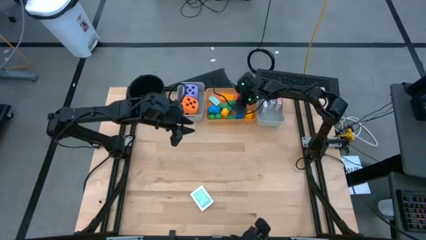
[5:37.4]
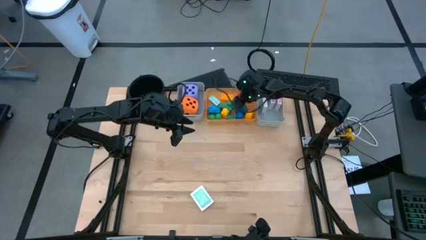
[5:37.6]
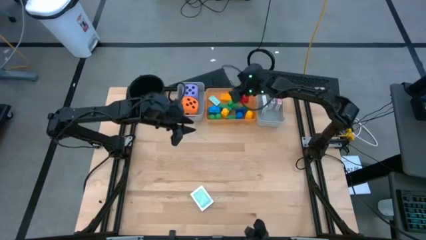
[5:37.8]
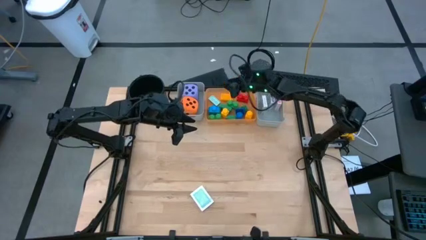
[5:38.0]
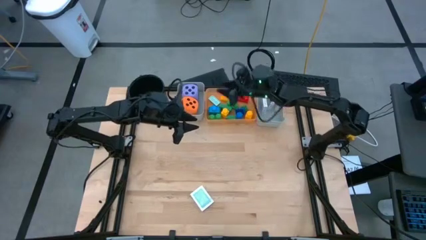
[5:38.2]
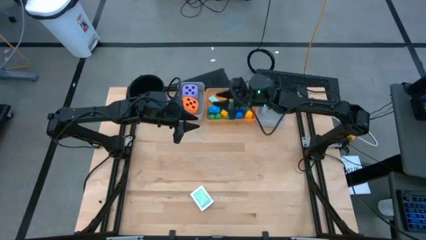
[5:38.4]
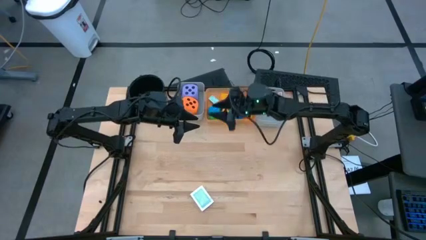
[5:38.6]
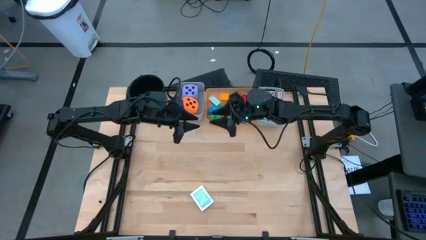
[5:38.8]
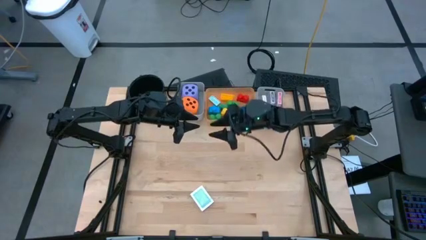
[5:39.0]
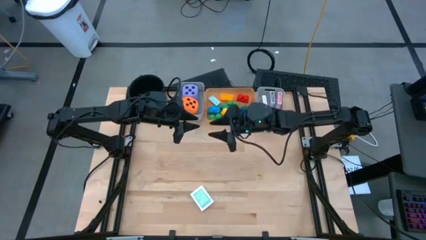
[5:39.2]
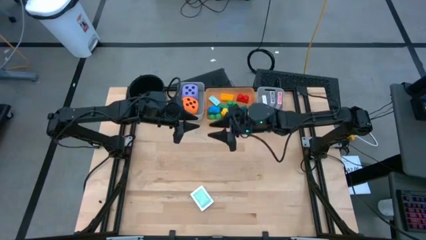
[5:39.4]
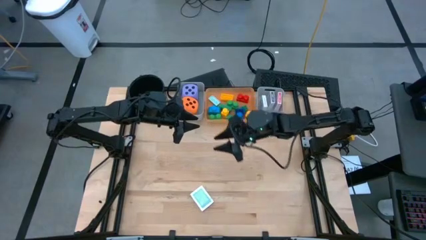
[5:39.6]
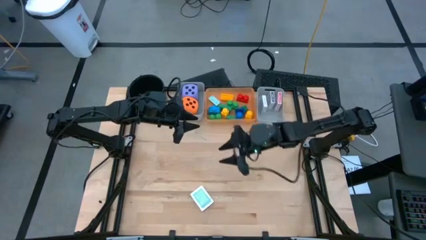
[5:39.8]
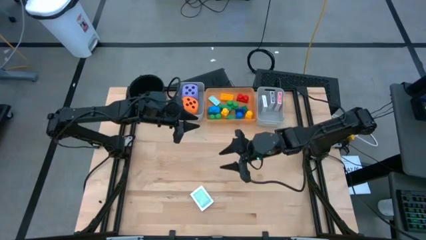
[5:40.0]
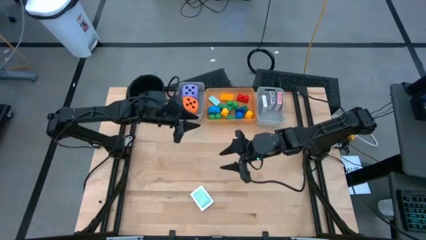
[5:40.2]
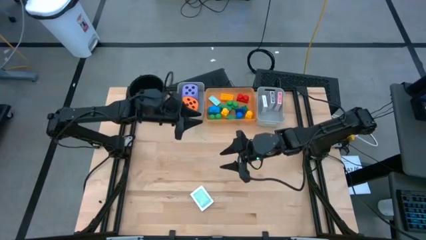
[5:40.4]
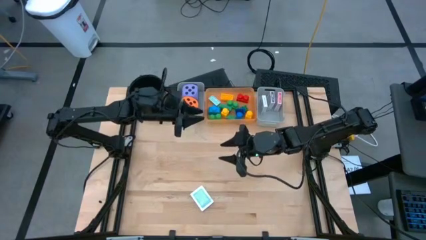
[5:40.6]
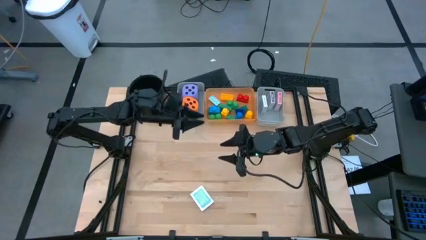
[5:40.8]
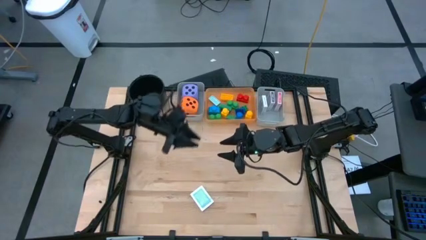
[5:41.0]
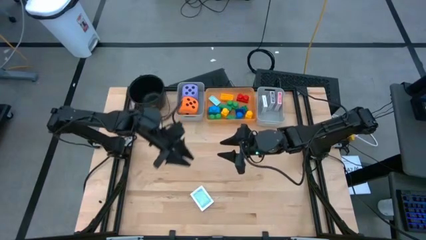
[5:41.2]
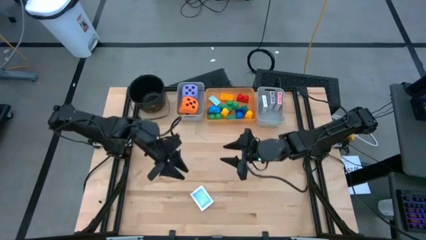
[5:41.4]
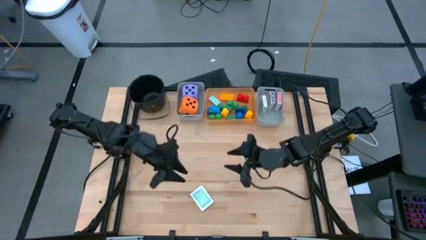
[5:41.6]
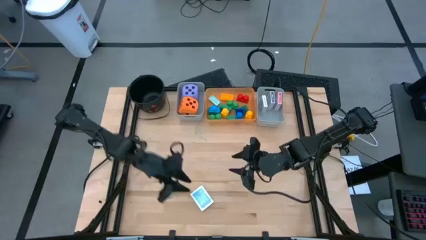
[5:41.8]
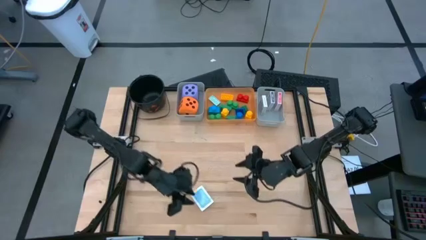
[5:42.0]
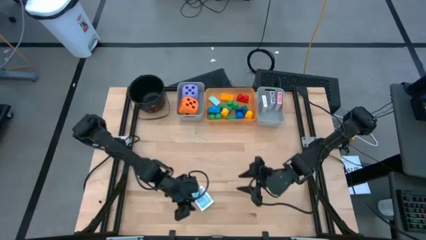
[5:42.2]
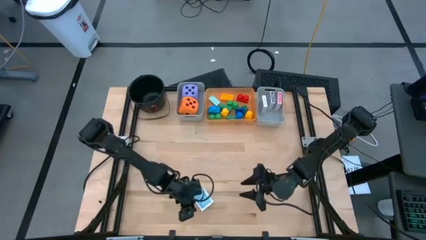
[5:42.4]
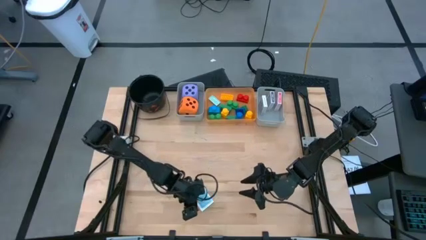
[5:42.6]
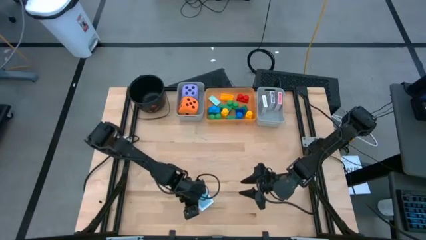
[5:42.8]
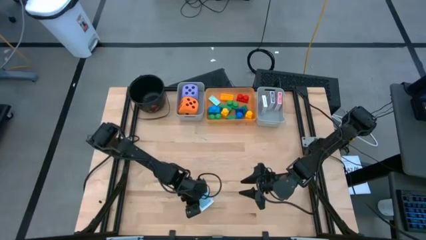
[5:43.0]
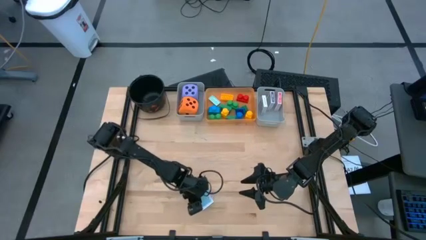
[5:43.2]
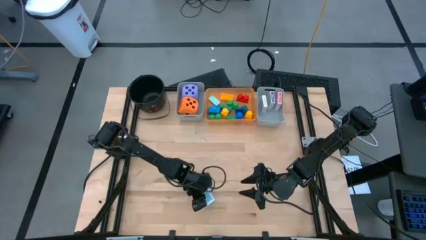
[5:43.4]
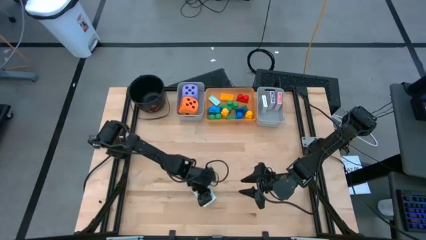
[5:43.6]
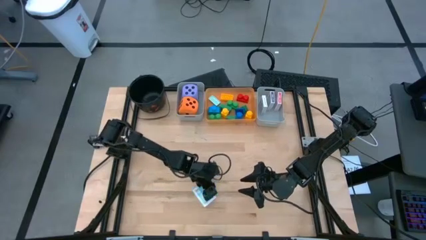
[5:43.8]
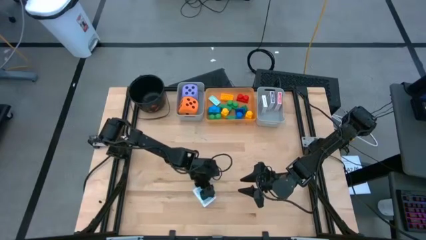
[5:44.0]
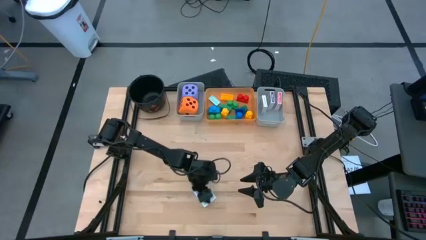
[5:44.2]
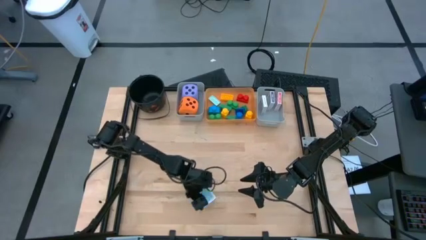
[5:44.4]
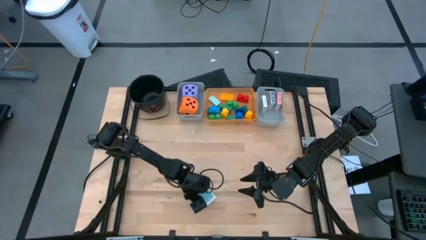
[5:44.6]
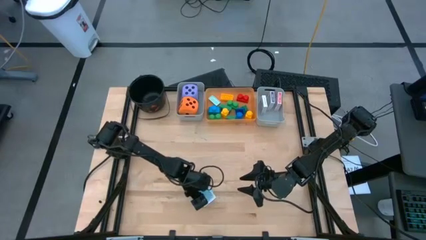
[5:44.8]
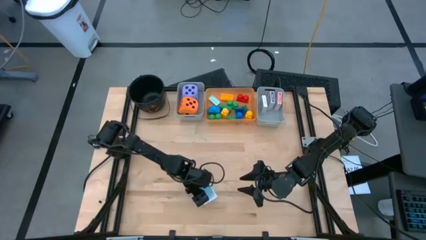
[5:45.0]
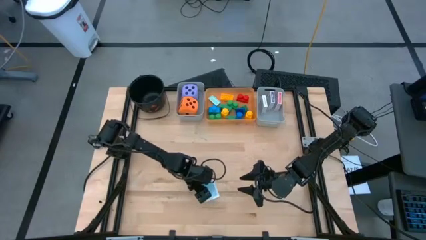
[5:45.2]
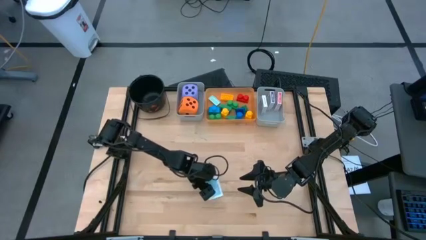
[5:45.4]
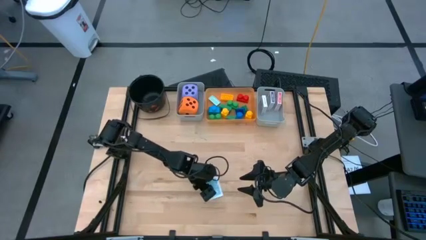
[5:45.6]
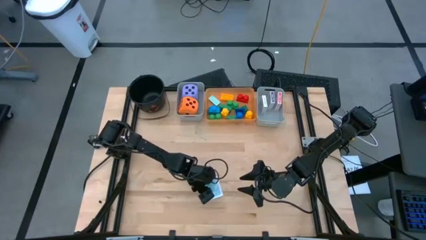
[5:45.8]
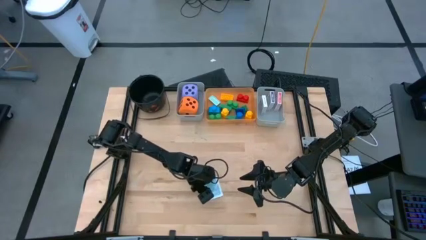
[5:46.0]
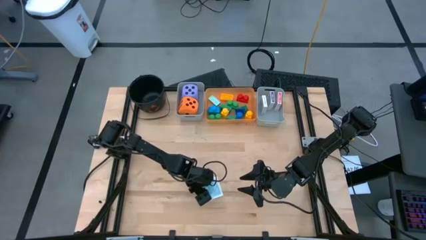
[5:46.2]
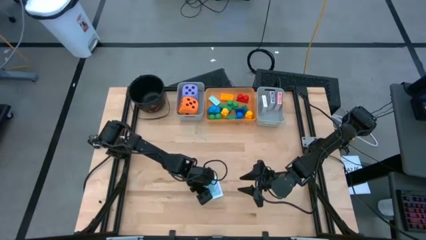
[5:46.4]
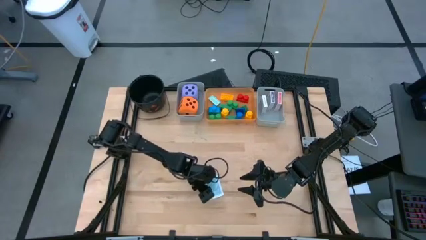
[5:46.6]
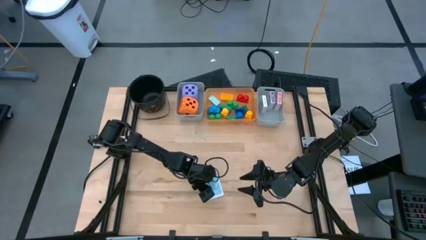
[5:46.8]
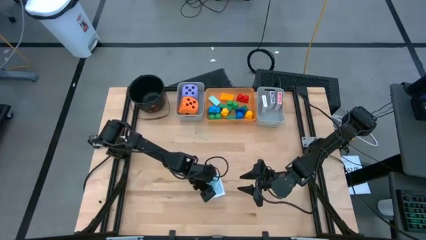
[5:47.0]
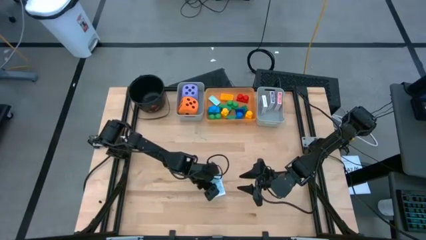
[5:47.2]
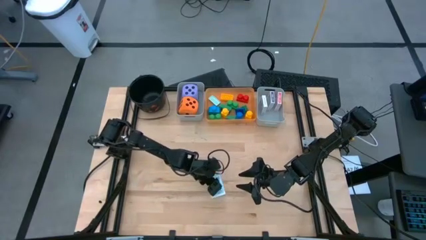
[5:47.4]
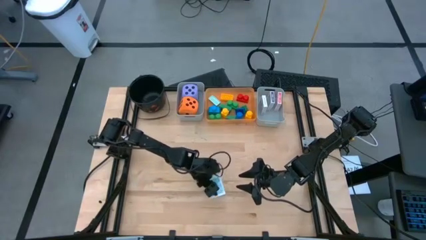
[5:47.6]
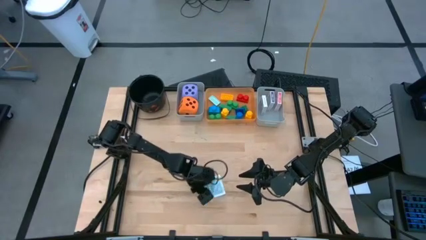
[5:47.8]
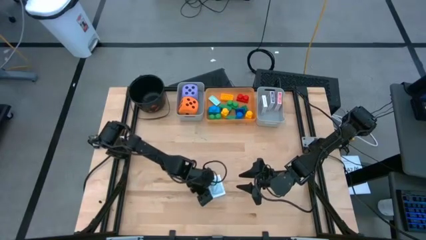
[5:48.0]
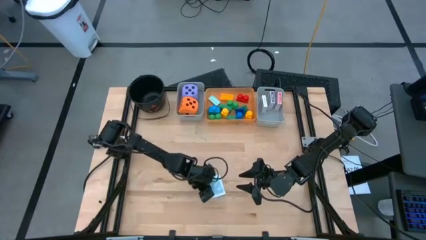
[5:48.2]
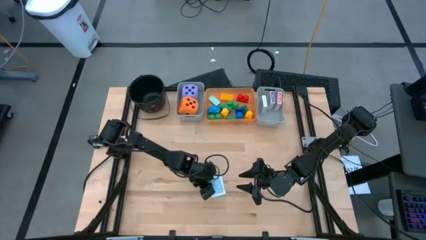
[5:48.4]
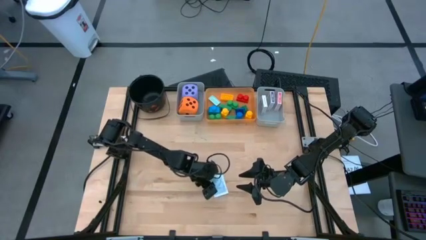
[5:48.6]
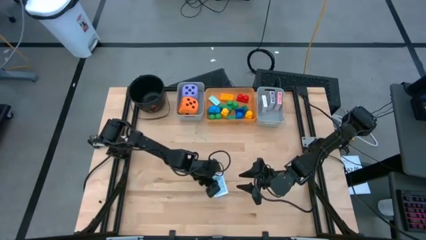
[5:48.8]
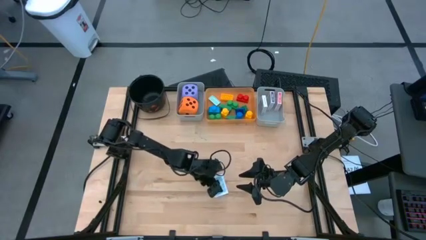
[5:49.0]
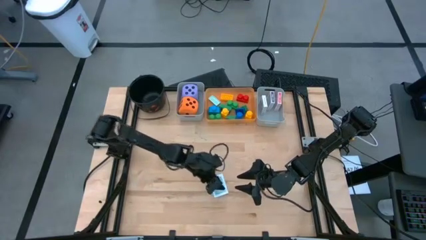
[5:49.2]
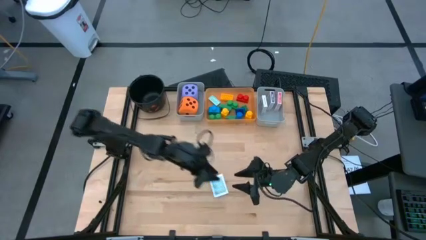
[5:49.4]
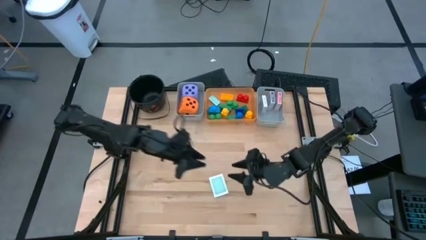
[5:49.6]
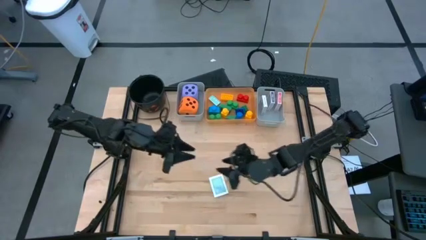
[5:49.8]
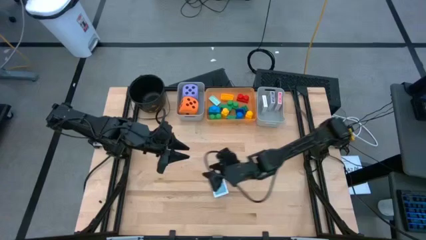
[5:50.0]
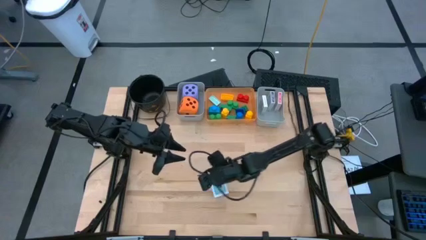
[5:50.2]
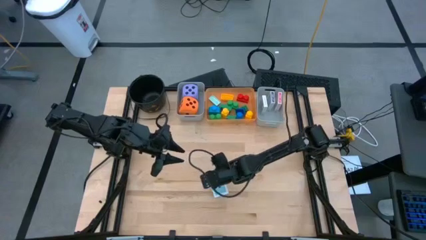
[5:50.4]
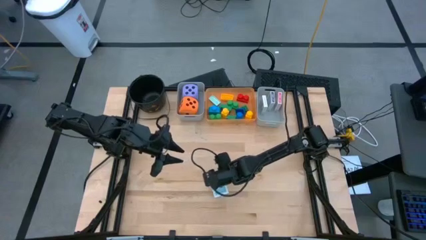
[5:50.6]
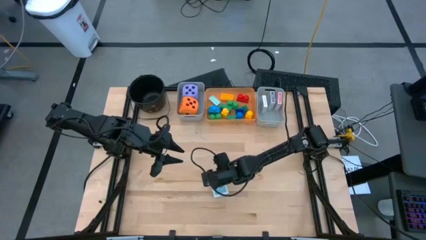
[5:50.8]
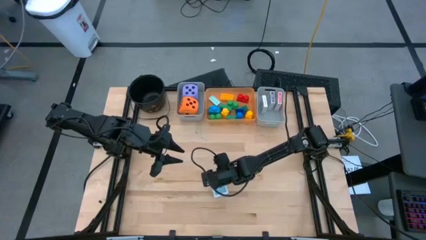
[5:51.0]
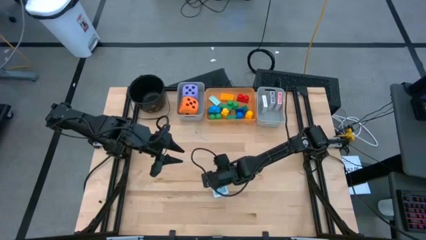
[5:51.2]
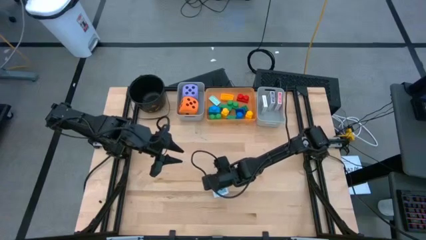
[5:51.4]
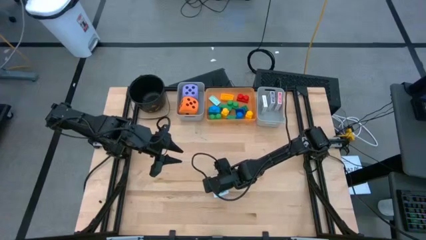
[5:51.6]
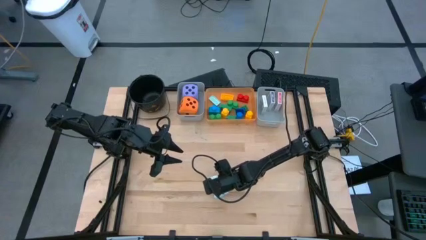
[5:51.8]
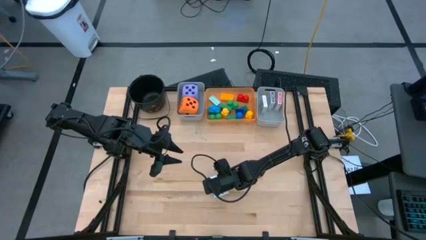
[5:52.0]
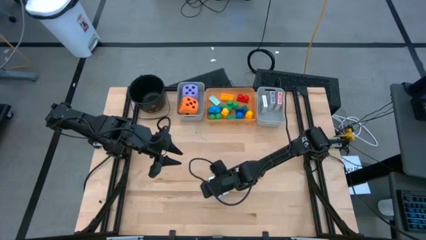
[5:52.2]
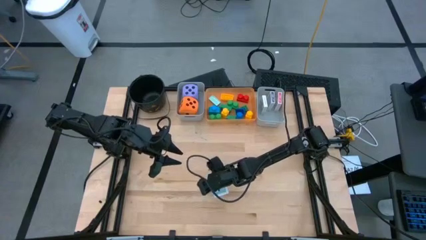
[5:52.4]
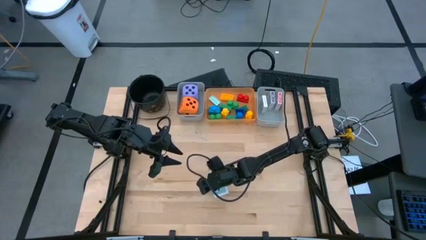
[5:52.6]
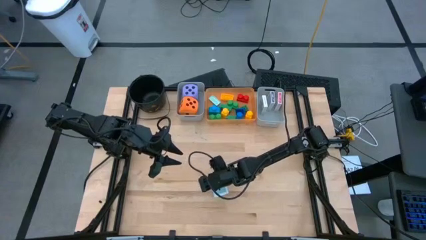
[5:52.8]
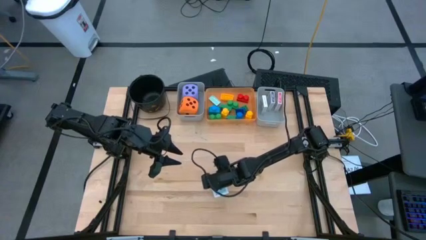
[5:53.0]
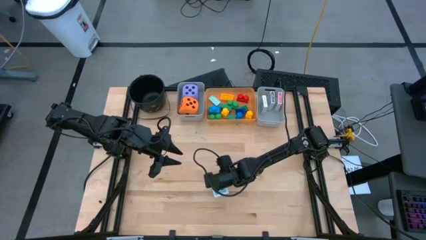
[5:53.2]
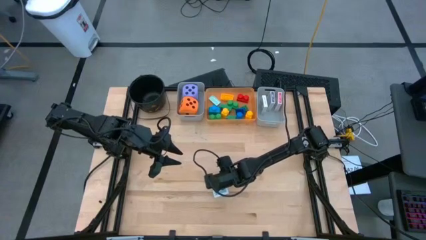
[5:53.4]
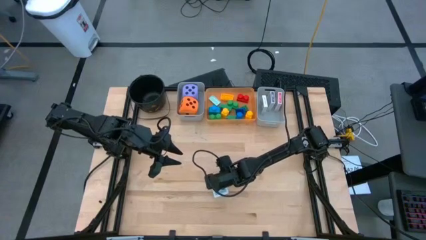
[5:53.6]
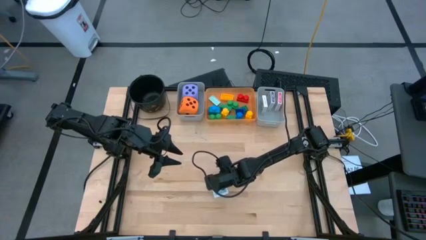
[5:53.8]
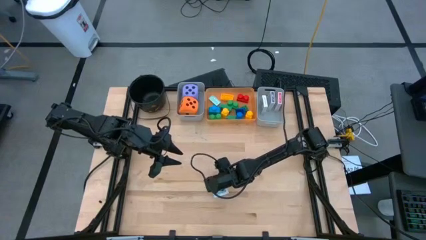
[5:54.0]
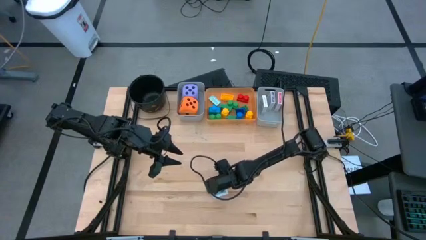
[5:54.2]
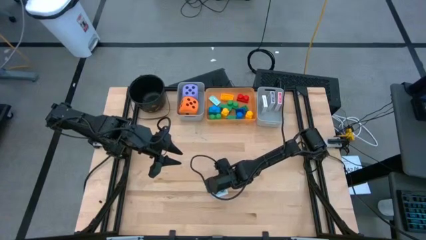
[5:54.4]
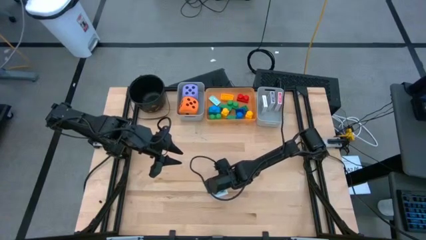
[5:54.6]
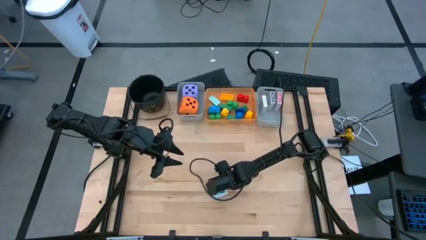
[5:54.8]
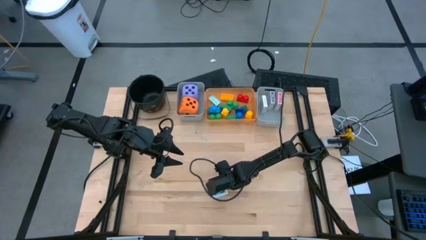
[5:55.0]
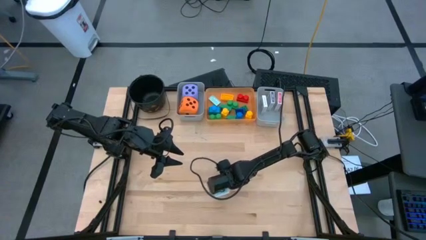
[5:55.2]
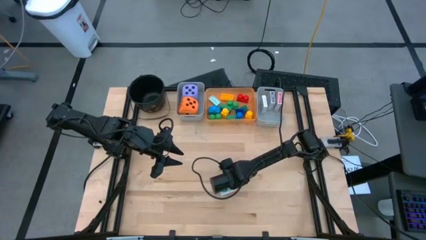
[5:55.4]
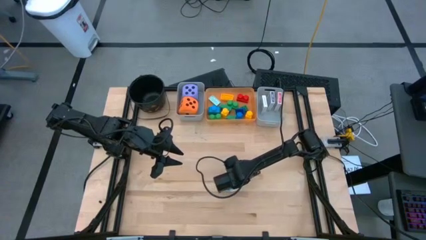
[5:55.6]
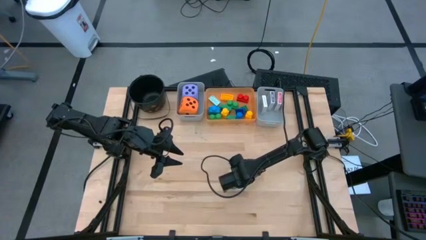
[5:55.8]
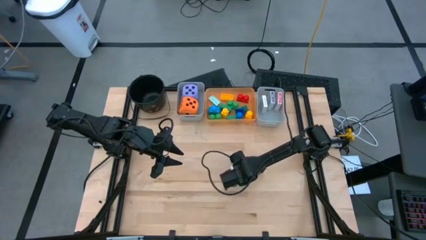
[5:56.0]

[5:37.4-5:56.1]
Task: Pick & Place Toys
Put the blue deck of cards into the right gray bin
